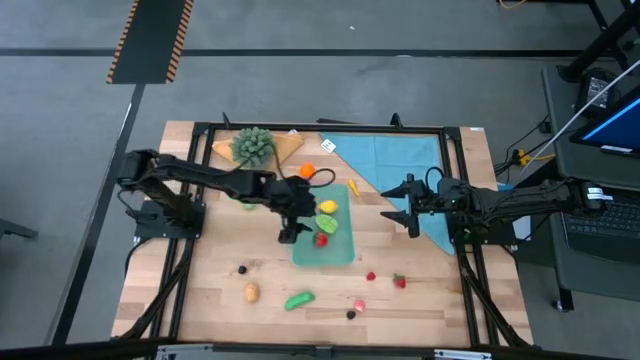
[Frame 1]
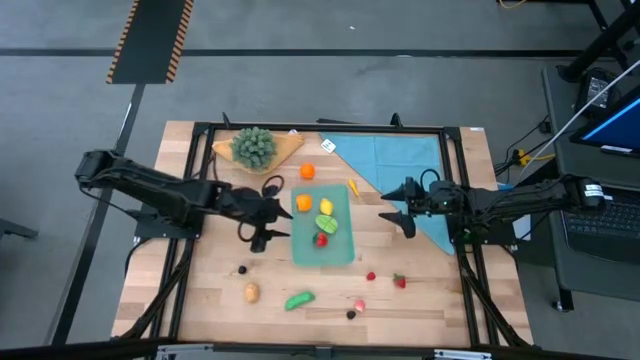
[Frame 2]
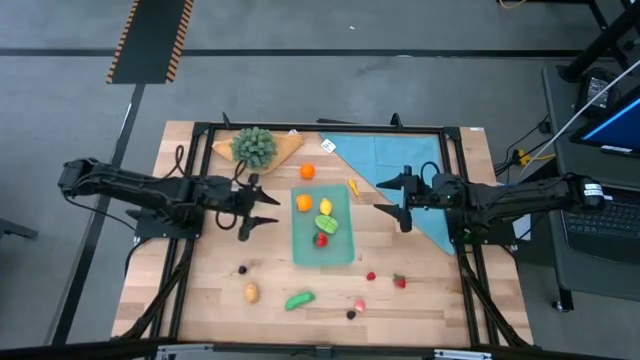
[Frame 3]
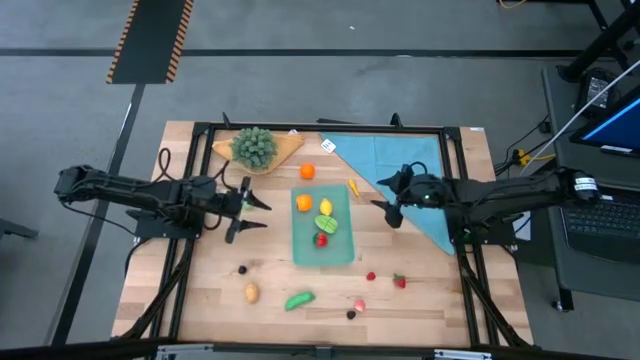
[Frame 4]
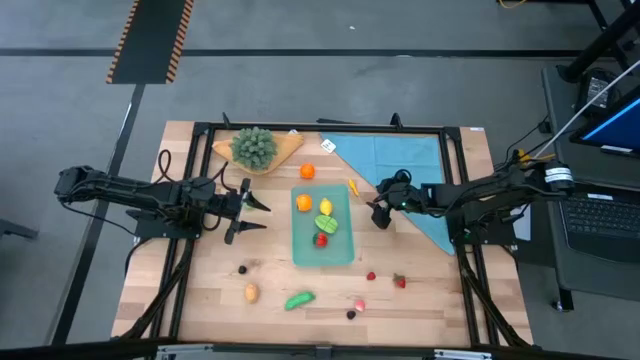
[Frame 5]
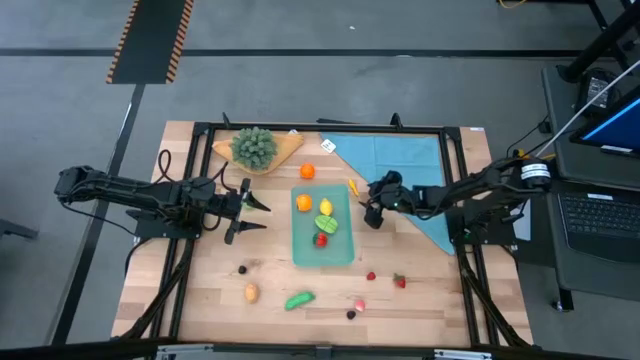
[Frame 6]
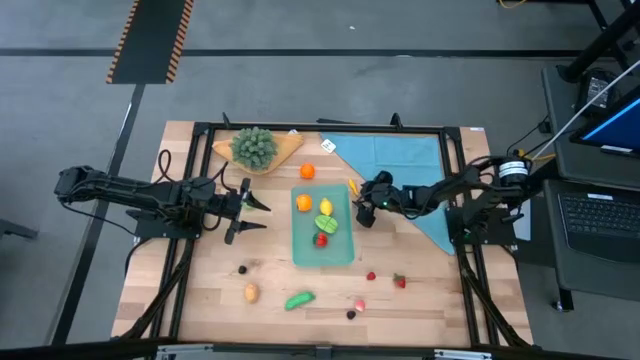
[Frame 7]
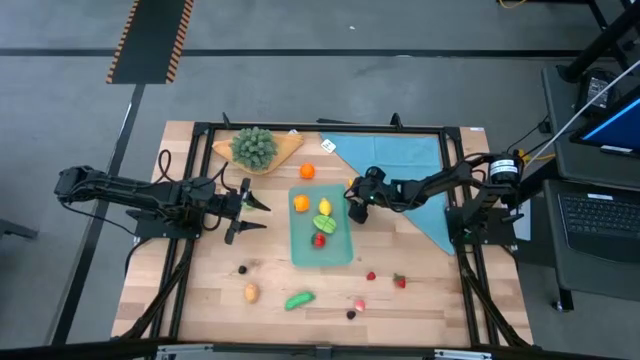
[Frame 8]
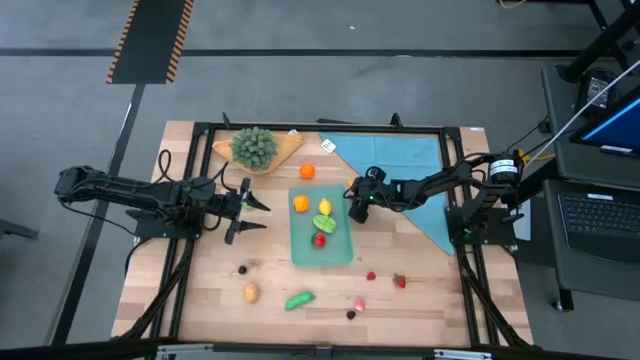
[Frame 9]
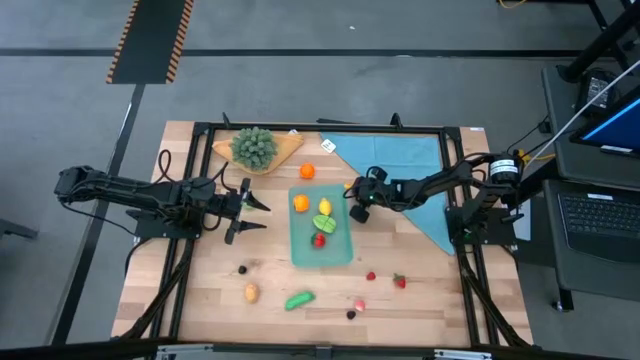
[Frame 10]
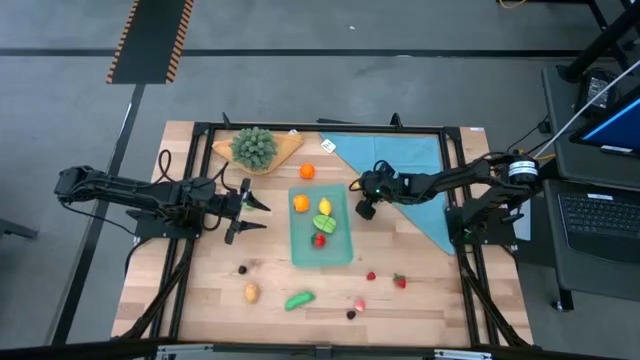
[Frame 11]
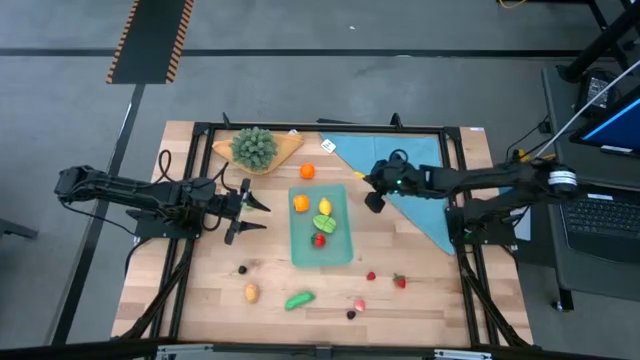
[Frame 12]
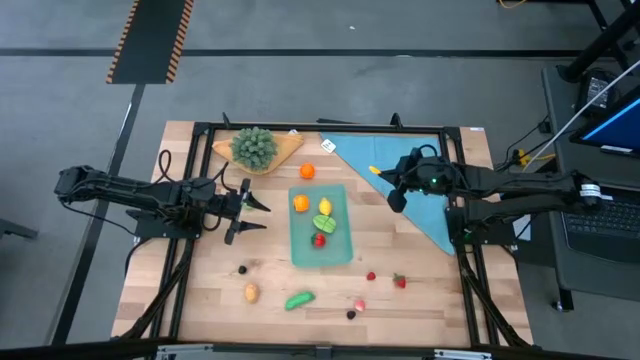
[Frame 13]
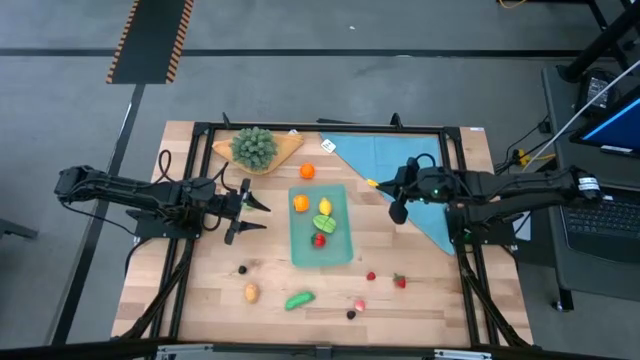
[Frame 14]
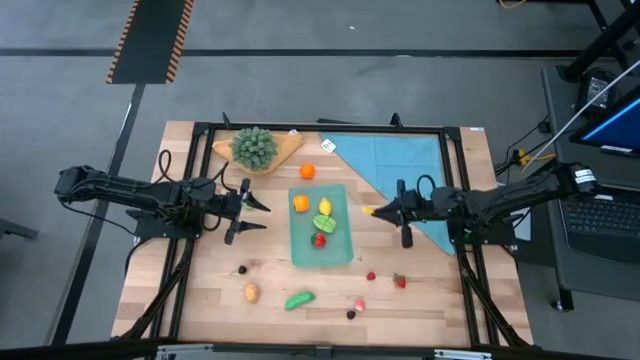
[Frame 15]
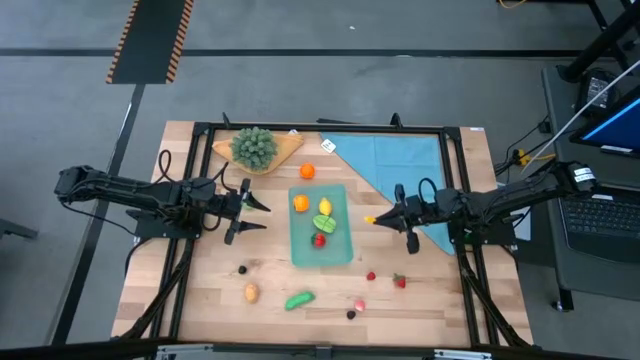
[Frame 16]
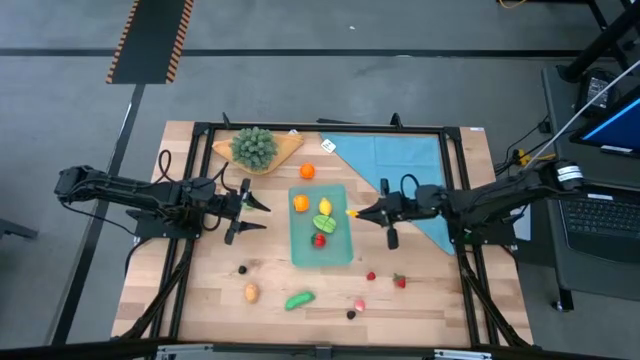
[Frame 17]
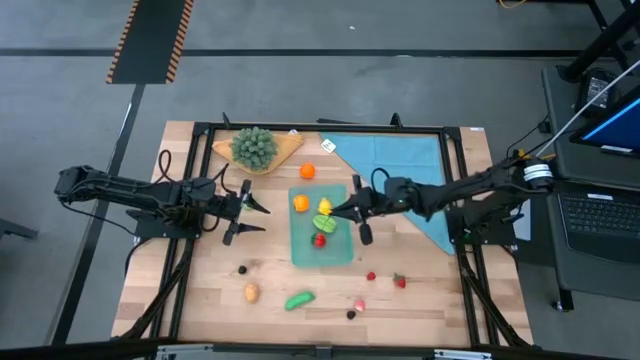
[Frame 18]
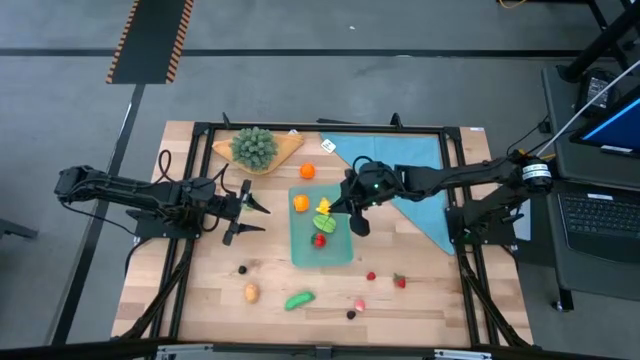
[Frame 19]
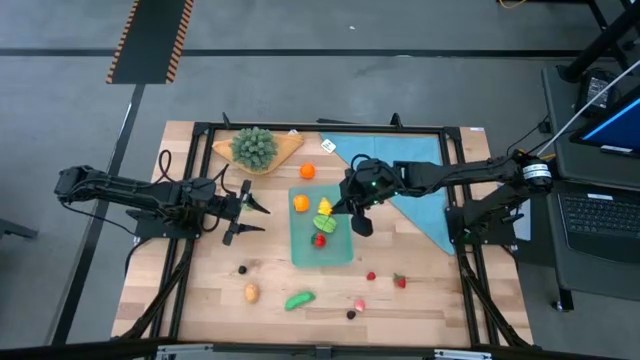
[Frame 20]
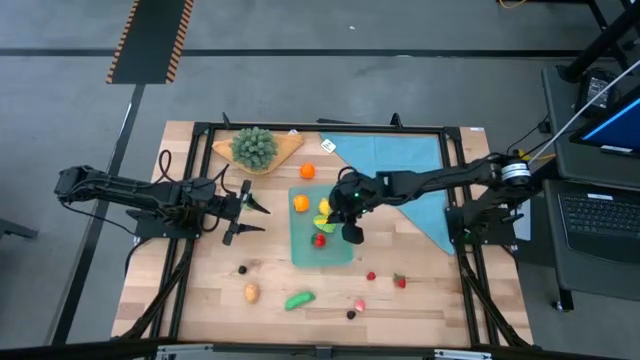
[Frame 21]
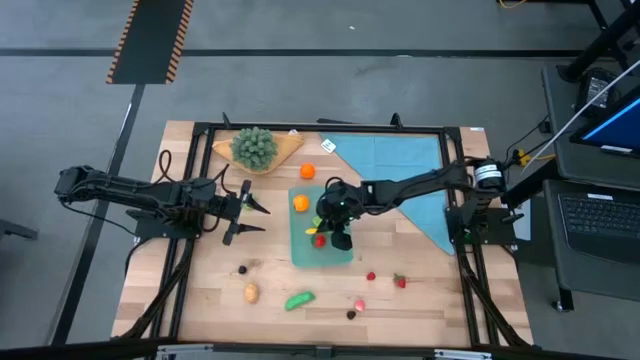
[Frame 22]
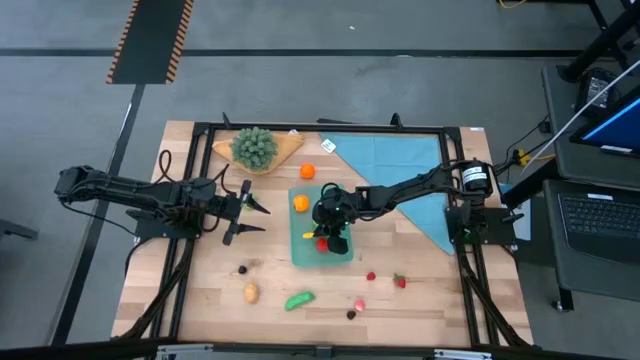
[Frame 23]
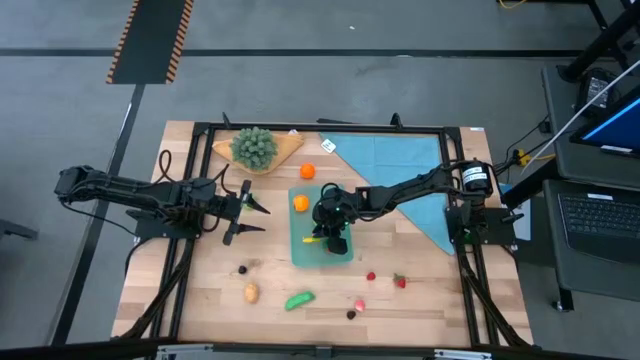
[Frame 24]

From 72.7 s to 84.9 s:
Task: Pick and placing Produce into tupperware
Put the banana into the bin

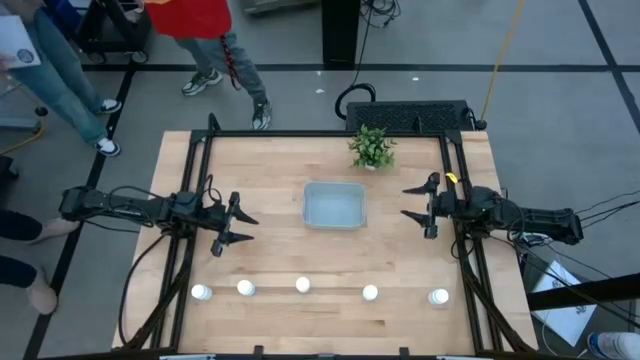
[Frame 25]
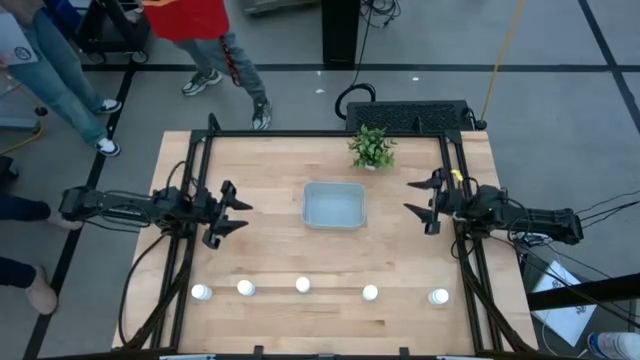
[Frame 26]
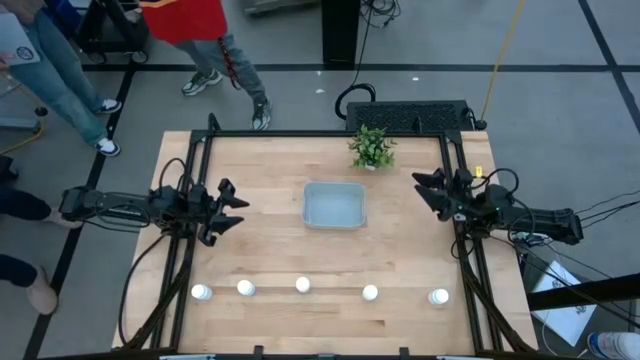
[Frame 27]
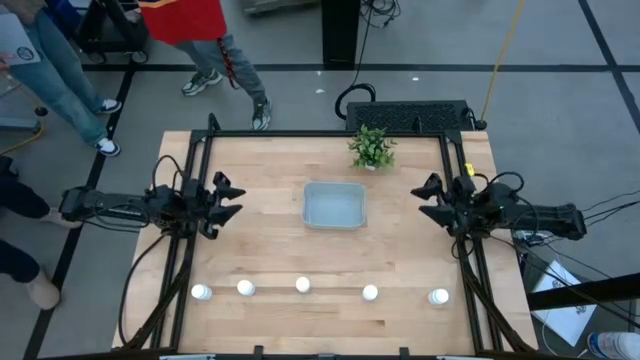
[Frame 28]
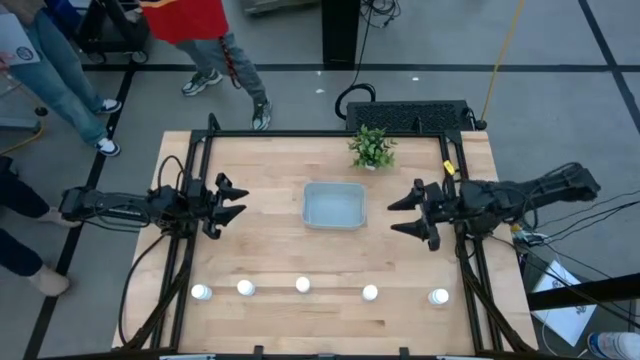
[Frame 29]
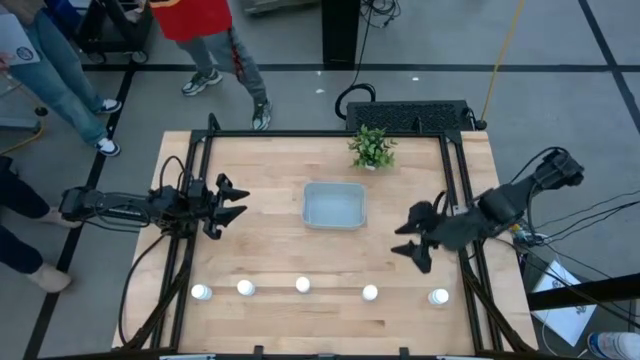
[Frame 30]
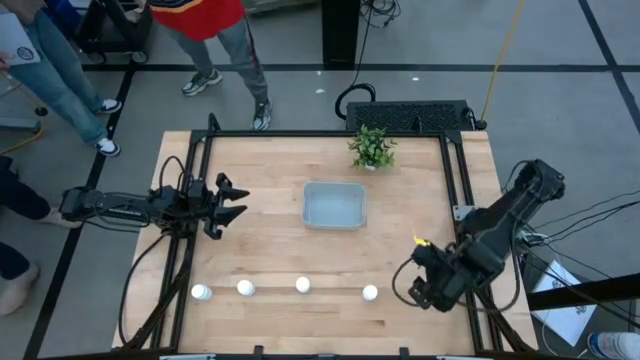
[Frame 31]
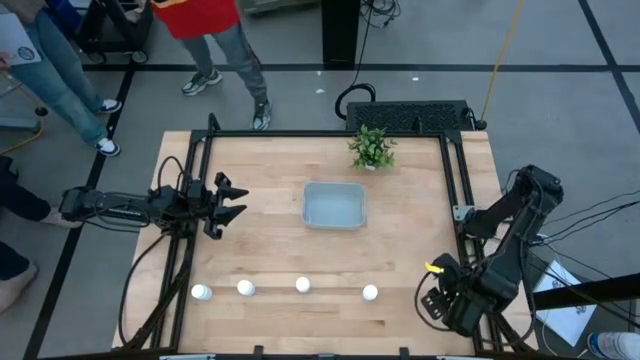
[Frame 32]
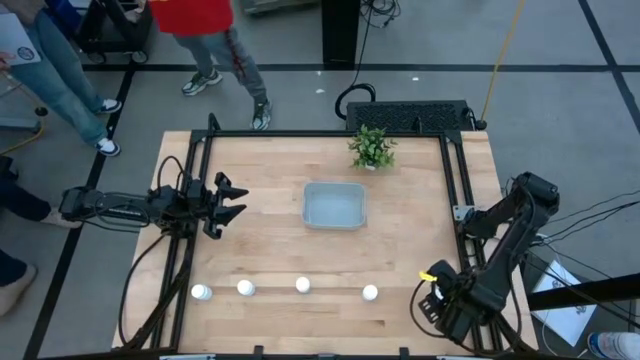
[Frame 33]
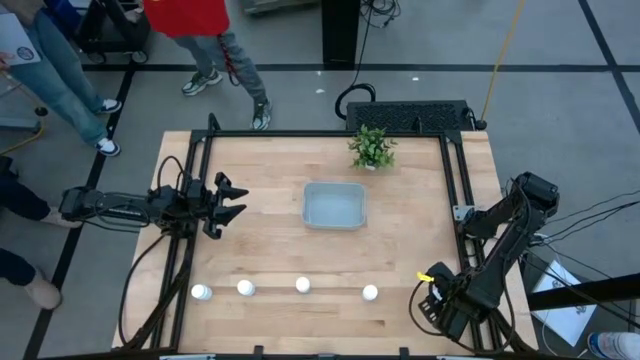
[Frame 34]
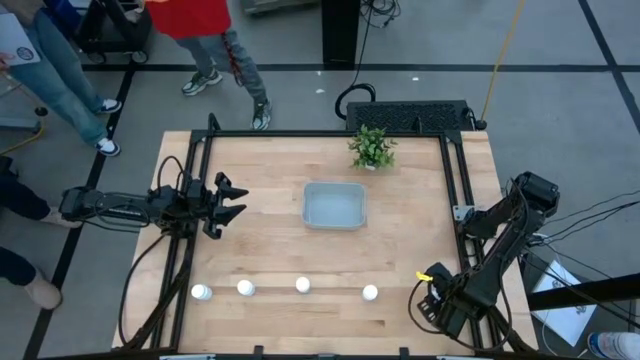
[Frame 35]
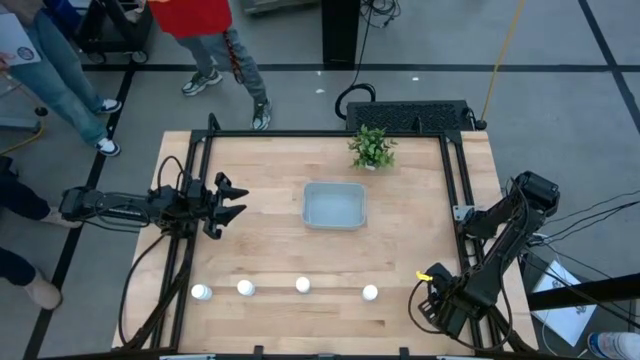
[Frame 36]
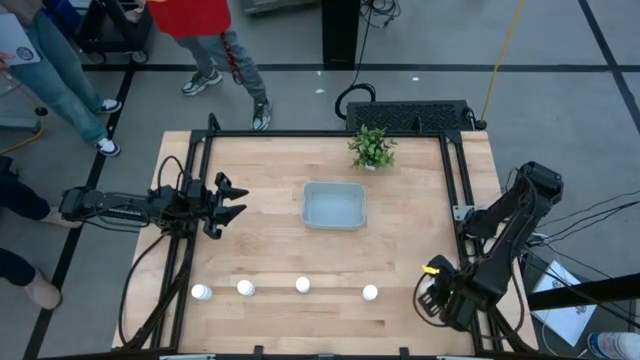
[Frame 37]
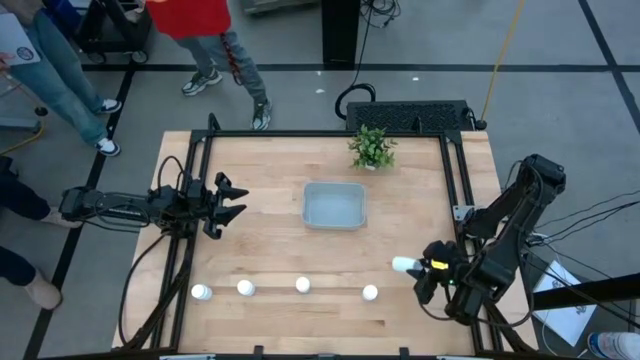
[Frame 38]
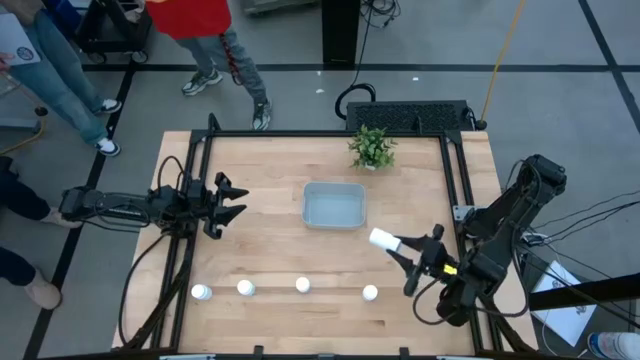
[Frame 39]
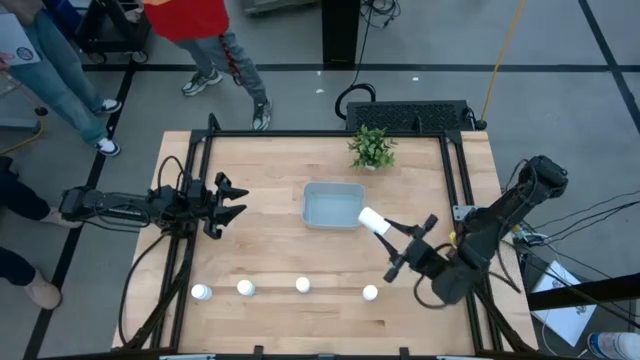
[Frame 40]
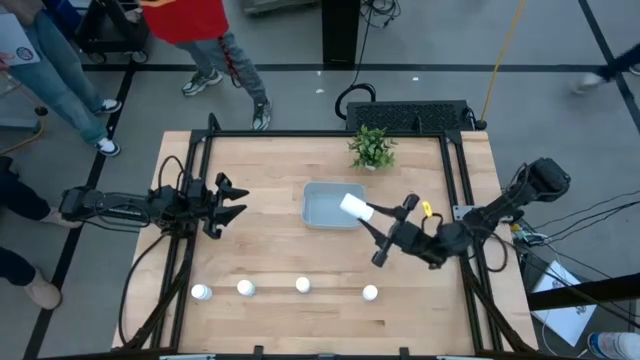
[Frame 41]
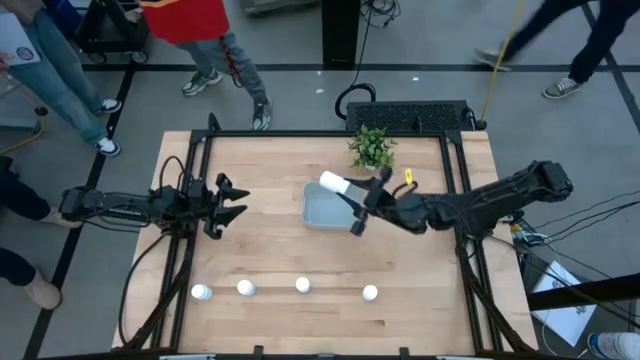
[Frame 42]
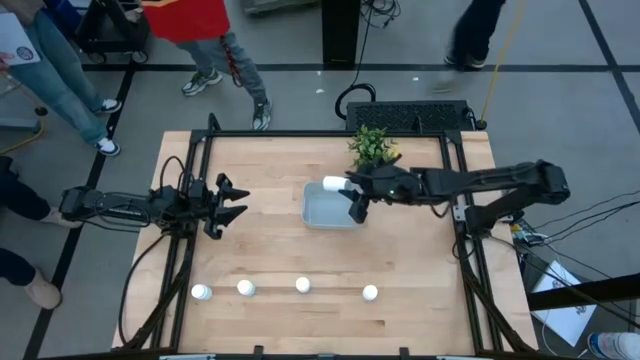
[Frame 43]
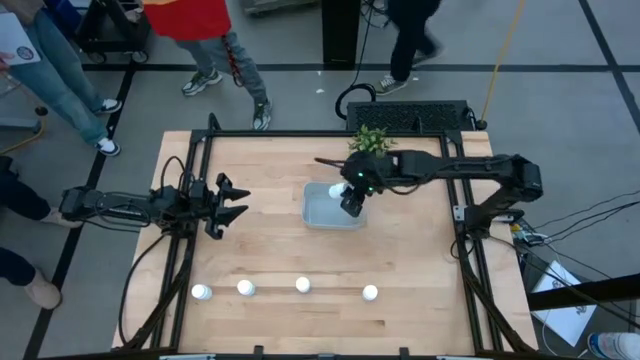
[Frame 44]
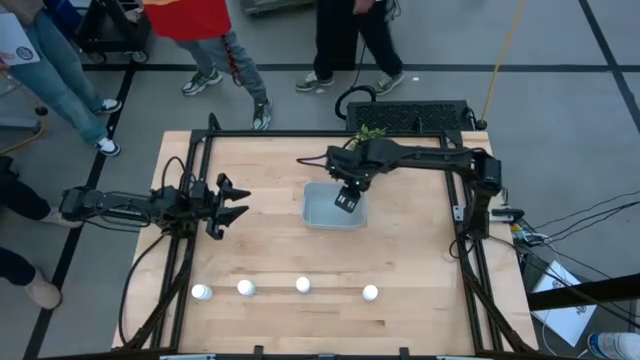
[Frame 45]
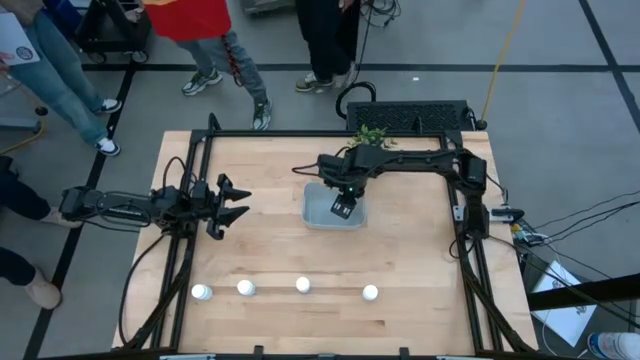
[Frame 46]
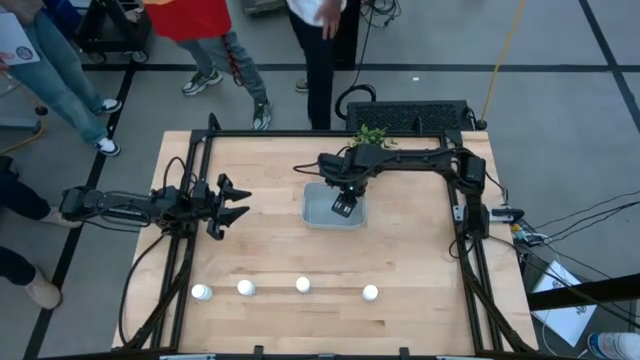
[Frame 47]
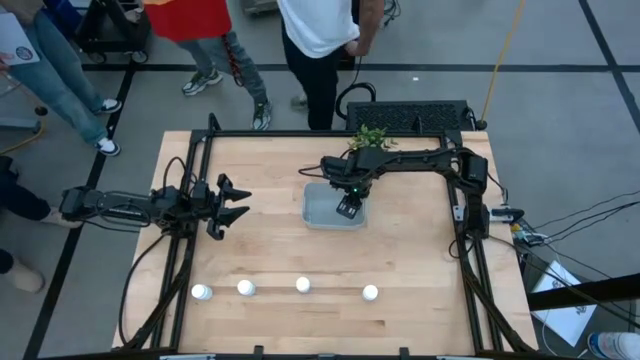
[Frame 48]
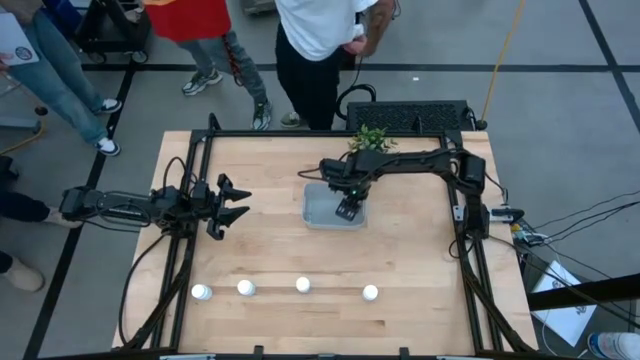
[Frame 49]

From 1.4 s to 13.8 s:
Task: Pick and place pill bottles into a basket
Put the white medicine bottle into the gray bin
